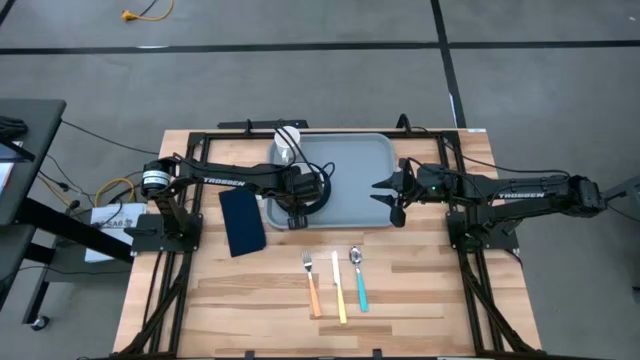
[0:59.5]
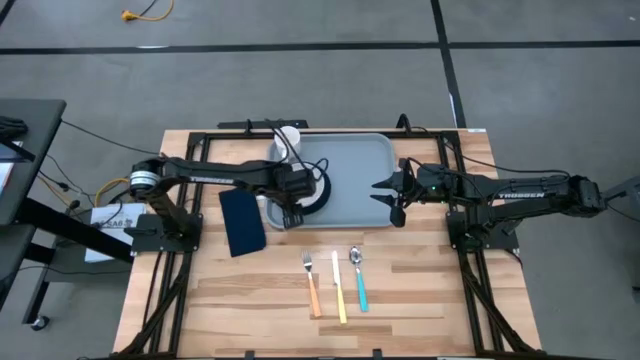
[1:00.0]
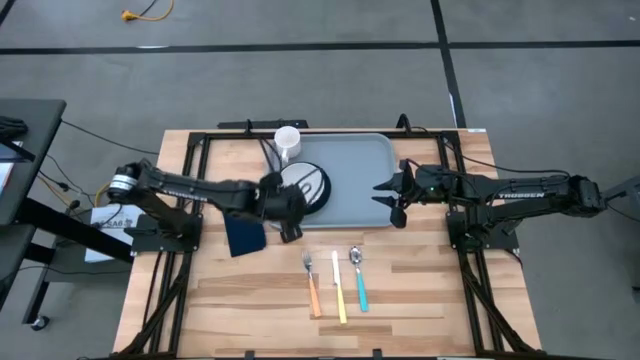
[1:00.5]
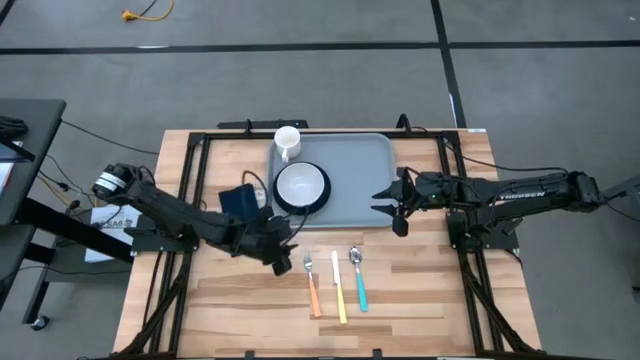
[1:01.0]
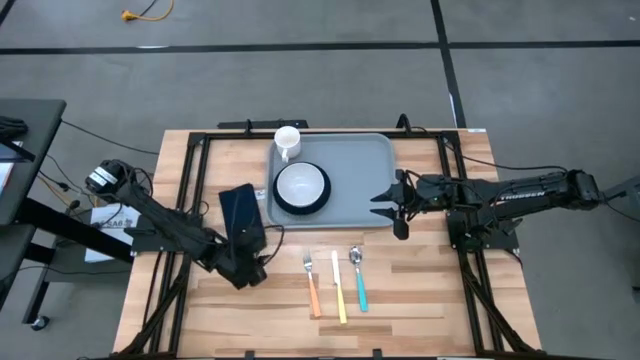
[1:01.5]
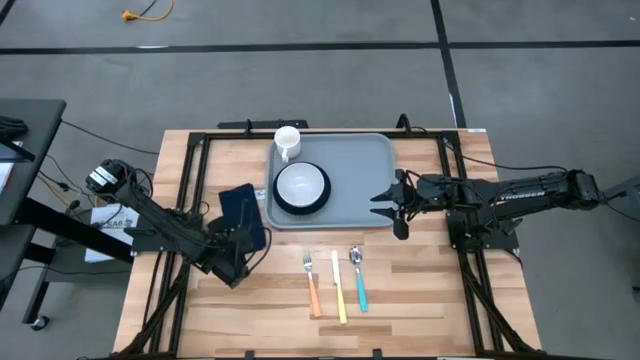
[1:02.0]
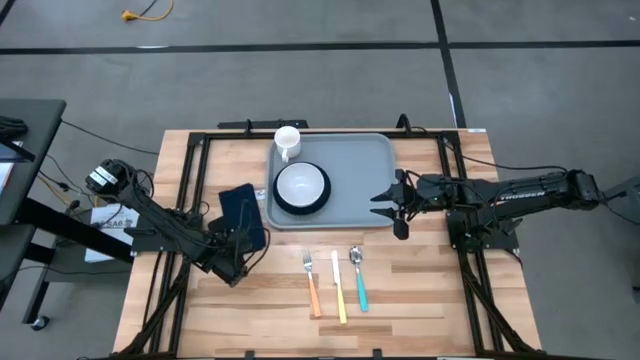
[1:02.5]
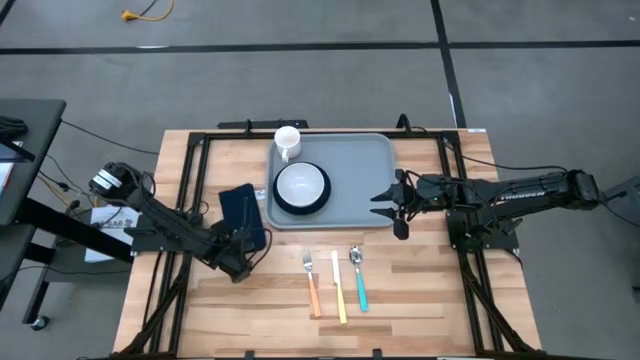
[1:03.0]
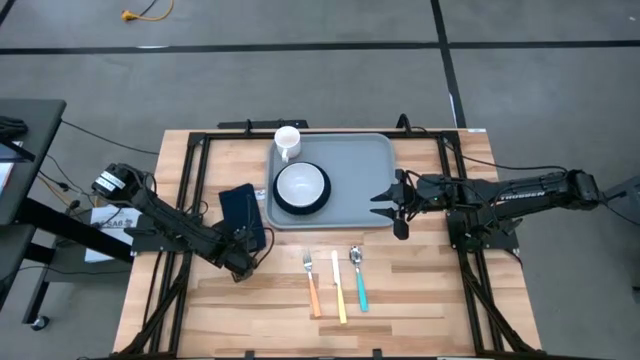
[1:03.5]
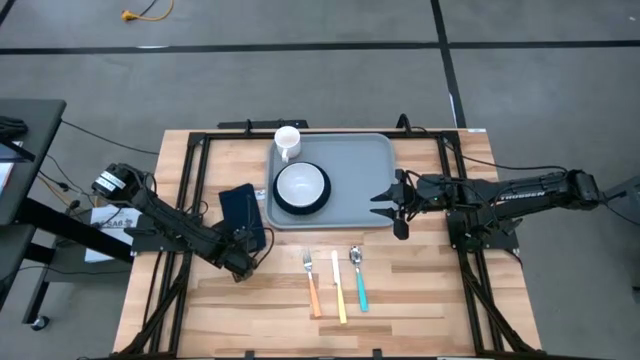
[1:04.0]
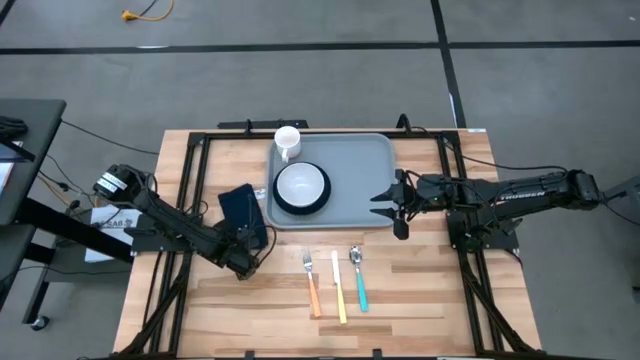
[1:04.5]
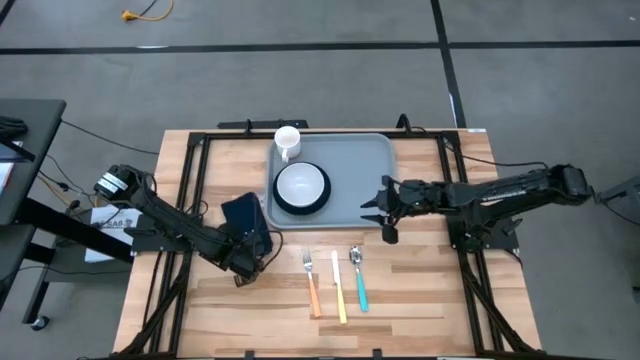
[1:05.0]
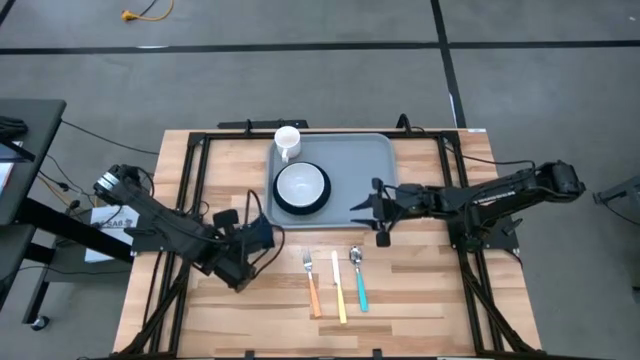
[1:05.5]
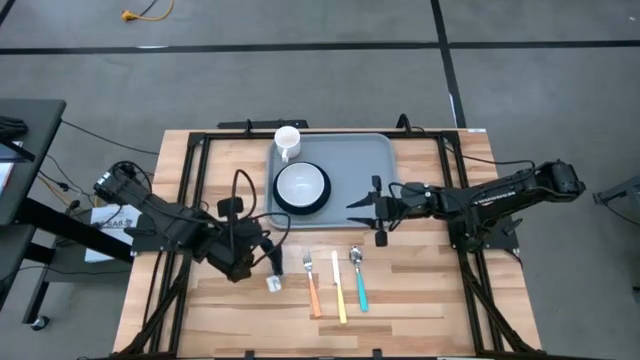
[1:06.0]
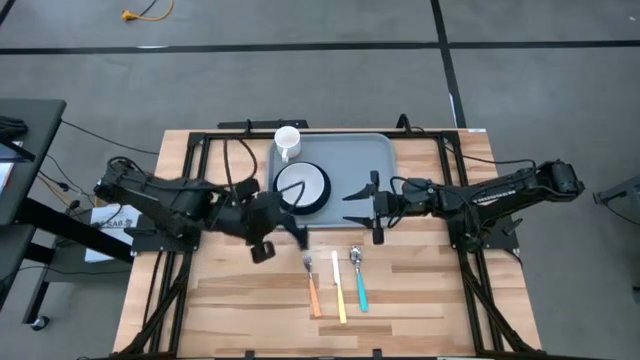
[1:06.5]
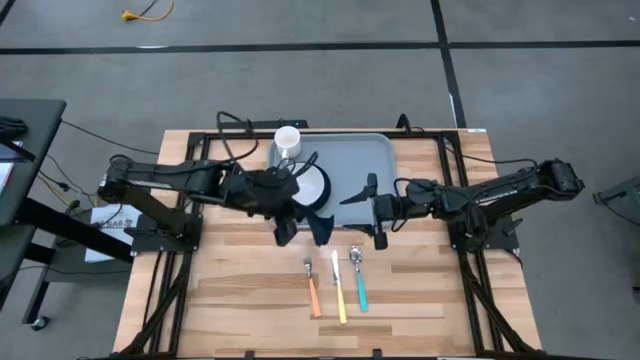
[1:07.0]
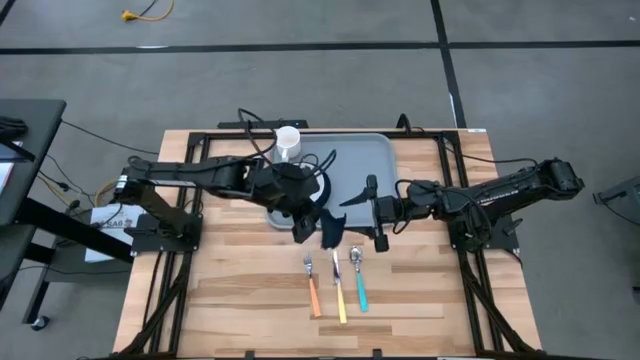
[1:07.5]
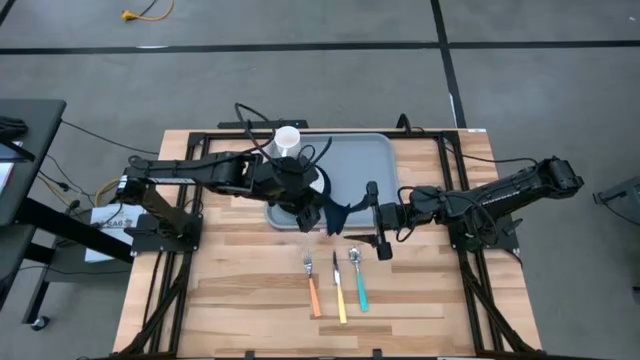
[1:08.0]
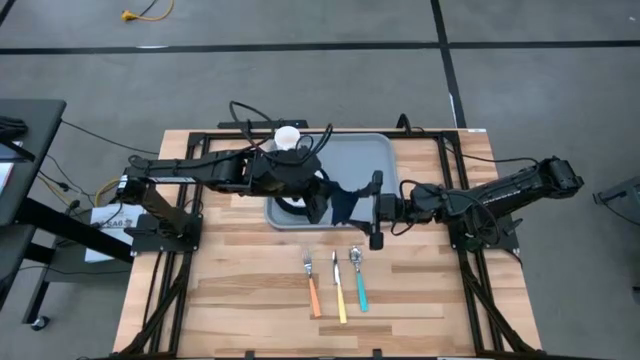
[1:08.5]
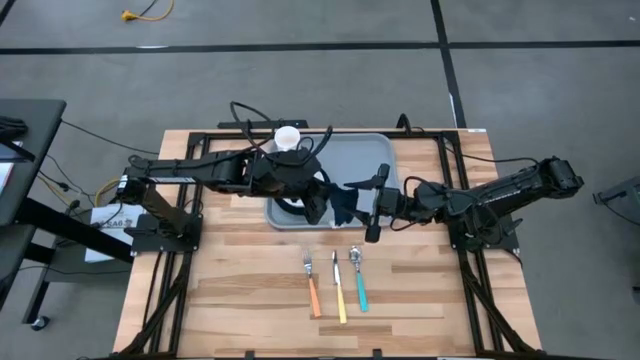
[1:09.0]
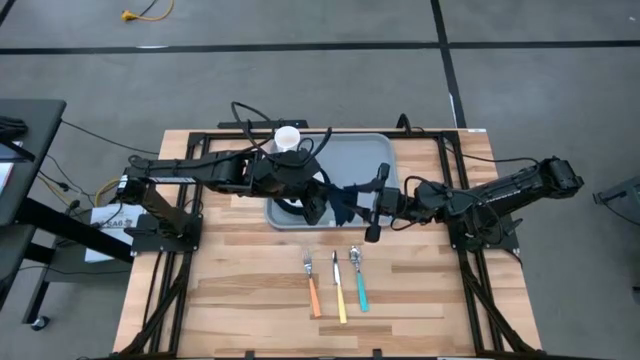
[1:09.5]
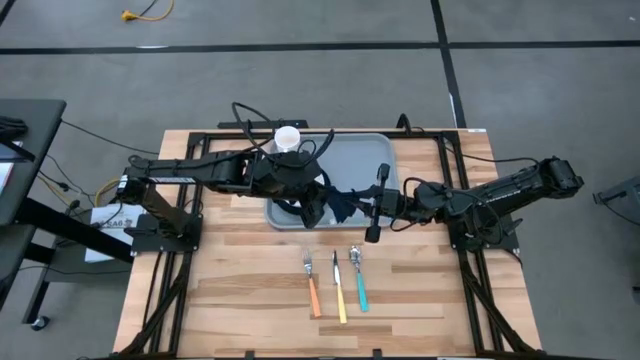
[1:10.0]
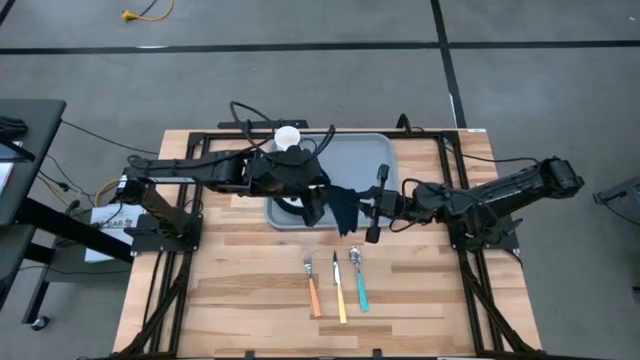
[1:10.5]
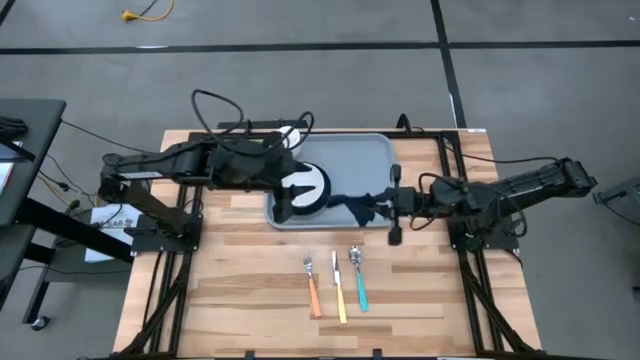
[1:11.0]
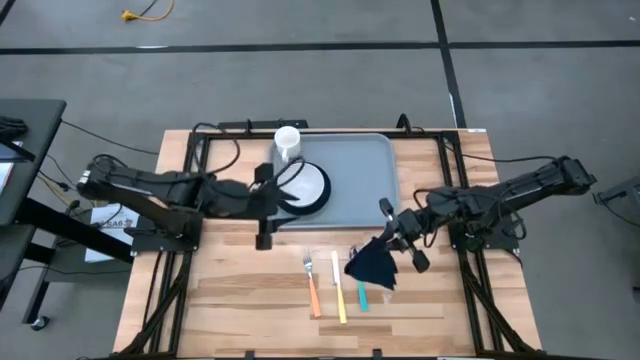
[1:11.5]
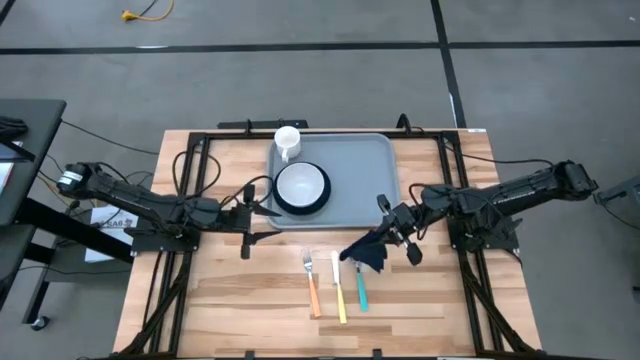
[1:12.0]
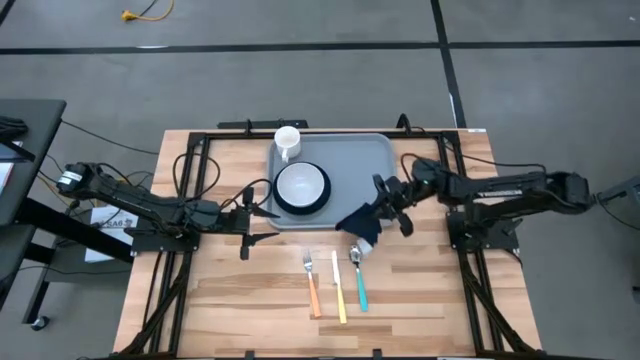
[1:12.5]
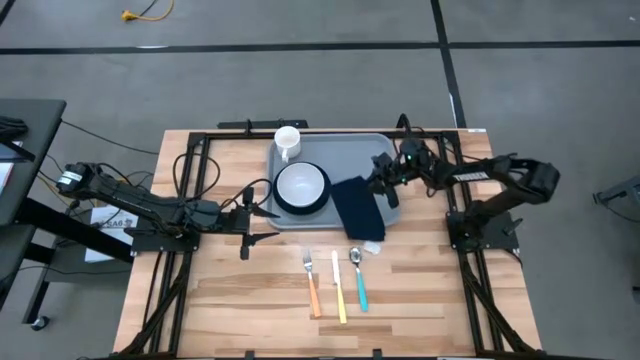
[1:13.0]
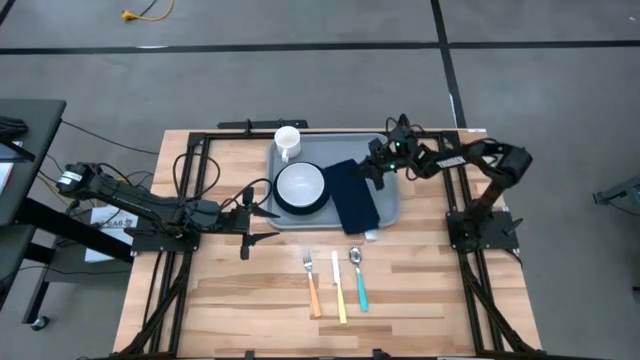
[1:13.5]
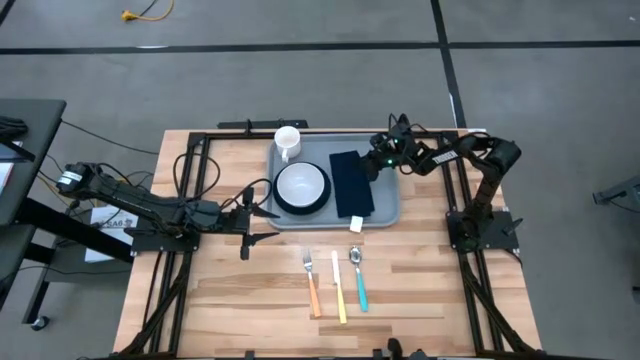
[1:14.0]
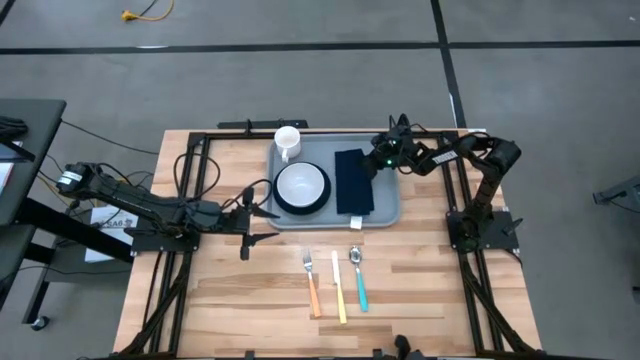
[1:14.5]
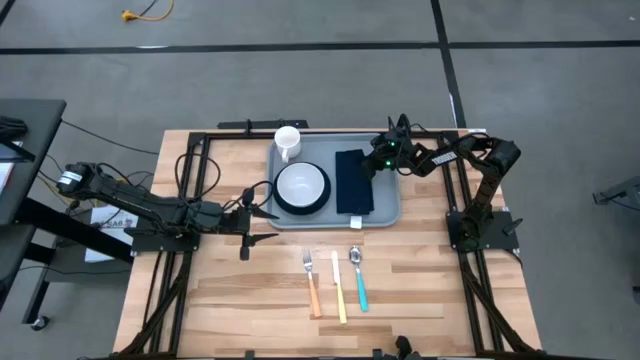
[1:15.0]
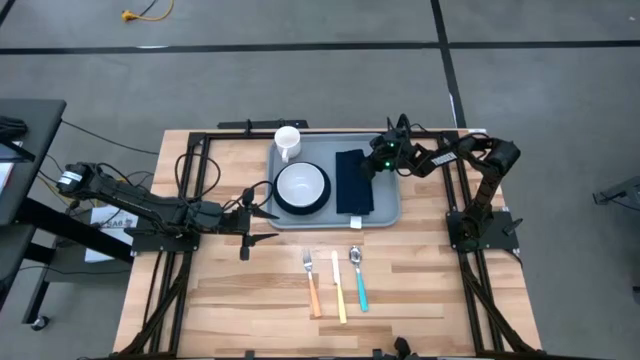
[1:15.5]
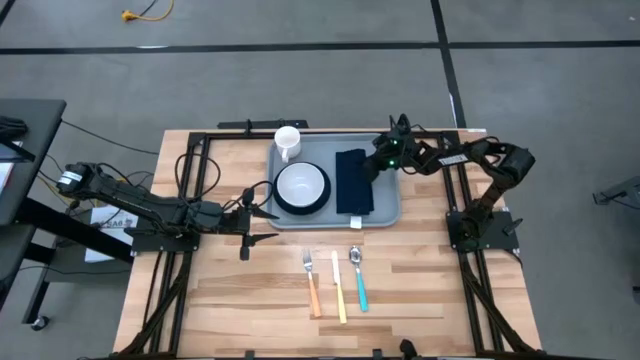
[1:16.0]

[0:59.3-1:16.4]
Task: Set up tray
Put the dark blue napkin on the blue tray to the right of the dark green plate

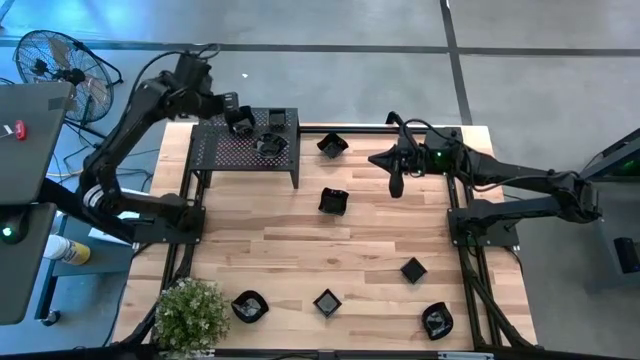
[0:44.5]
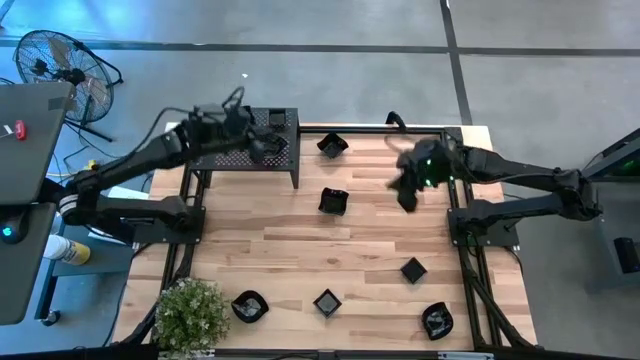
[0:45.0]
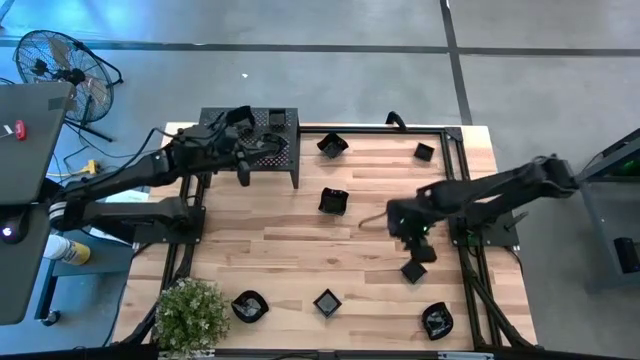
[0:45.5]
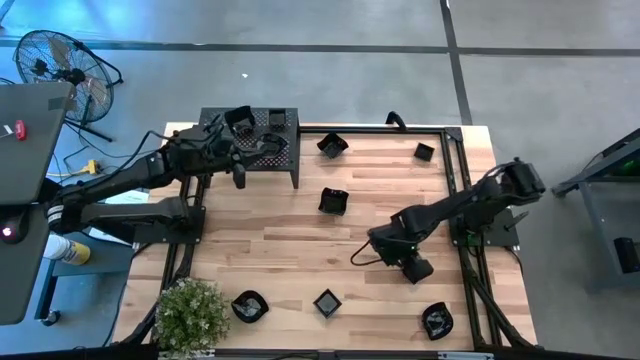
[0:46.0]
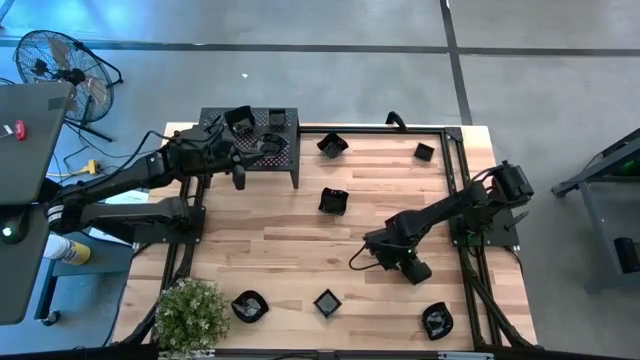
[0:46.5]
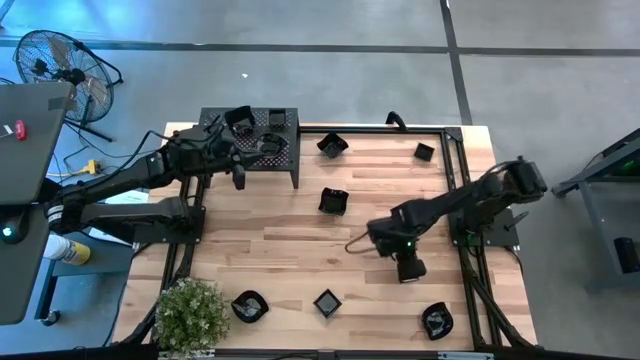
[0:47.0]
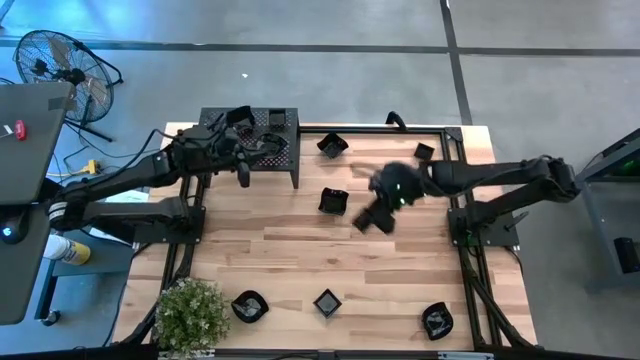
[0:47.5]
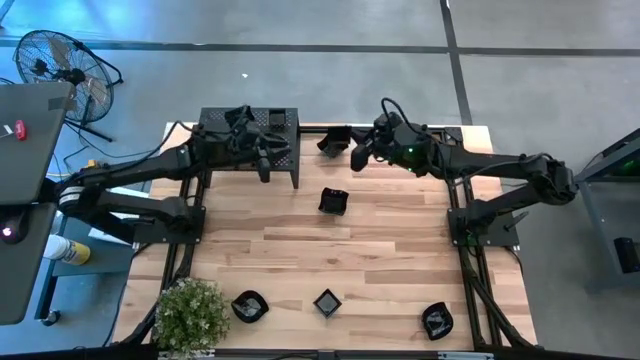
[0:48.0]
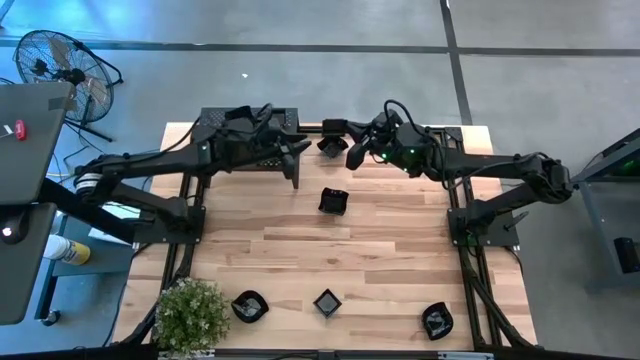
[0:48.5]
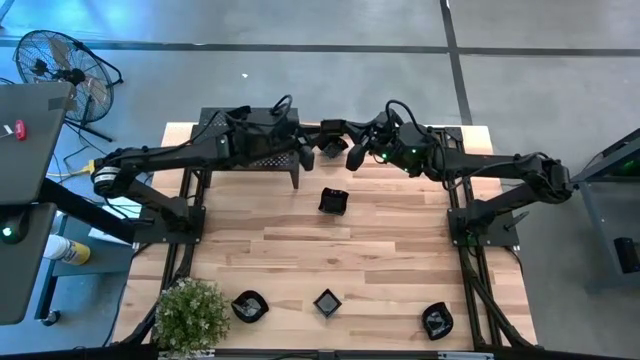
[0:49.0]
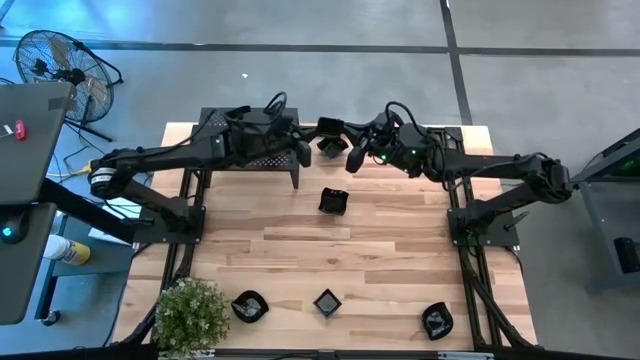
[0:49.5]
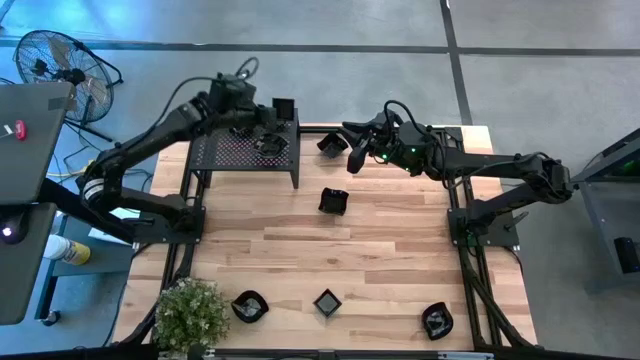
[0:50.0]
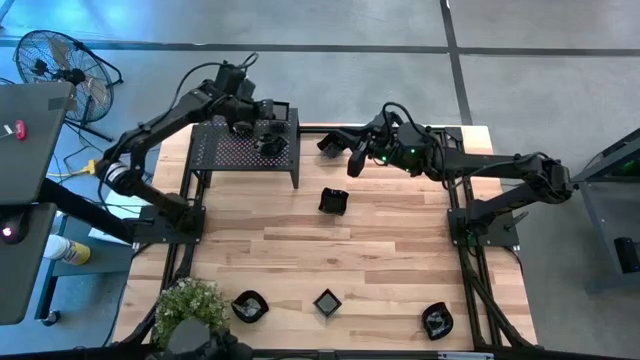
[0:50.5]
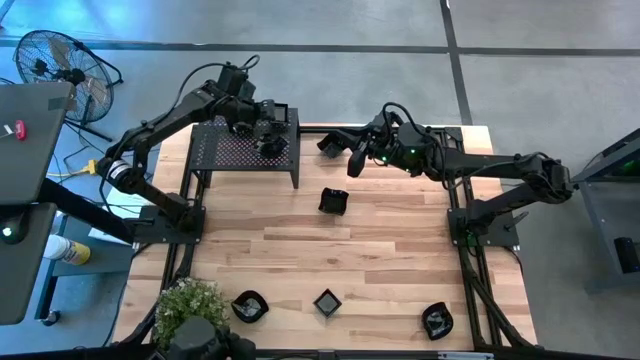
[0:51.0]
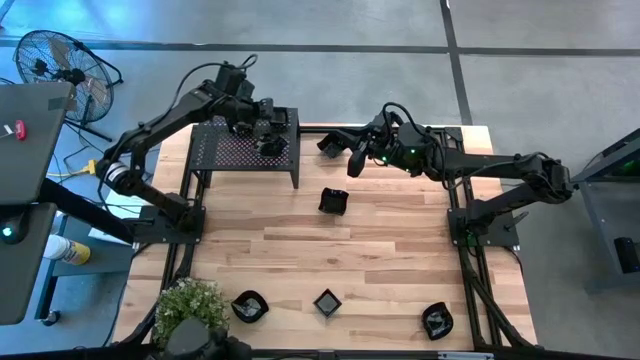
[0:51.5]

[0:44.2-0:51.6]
Task: Pick & Place Mini shaped plates
Stack the square plate on top of the other square plate on the shelf
